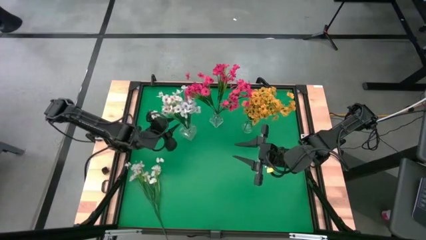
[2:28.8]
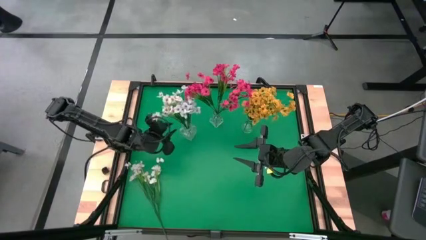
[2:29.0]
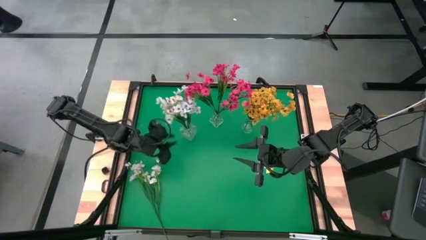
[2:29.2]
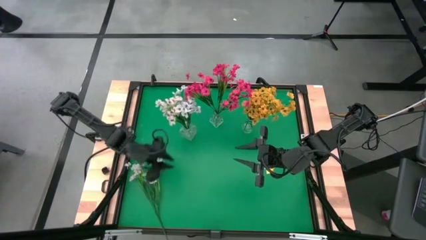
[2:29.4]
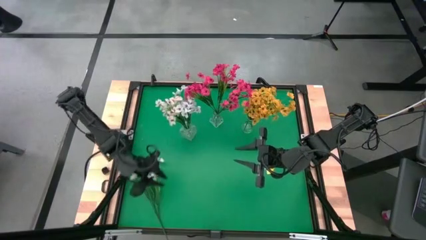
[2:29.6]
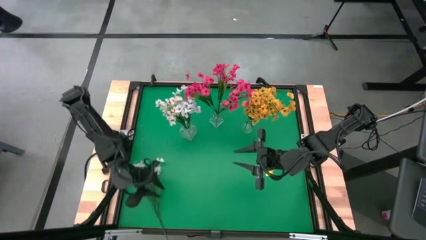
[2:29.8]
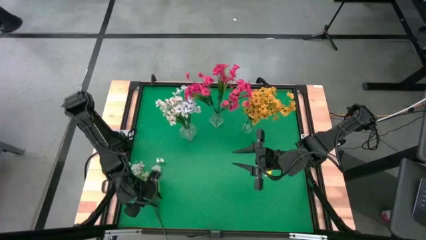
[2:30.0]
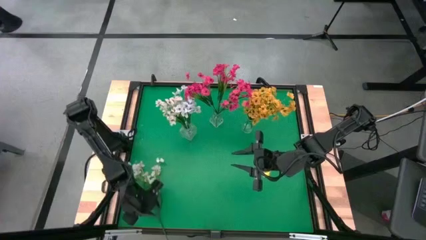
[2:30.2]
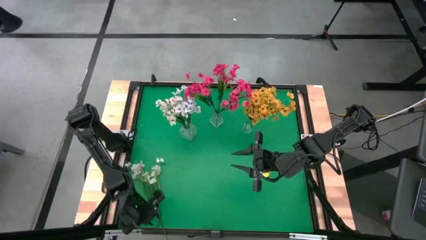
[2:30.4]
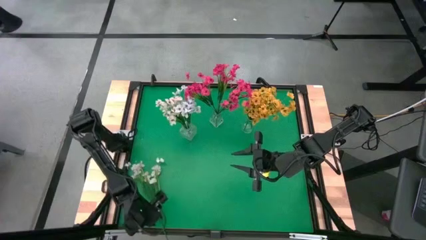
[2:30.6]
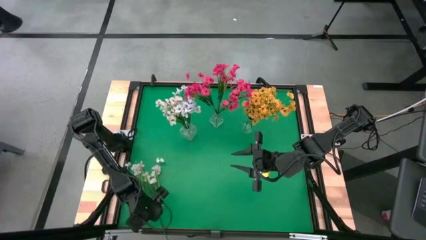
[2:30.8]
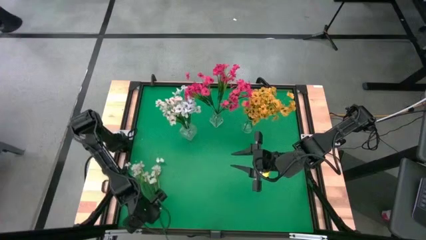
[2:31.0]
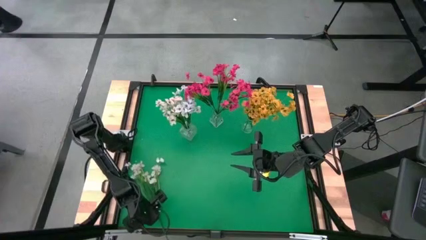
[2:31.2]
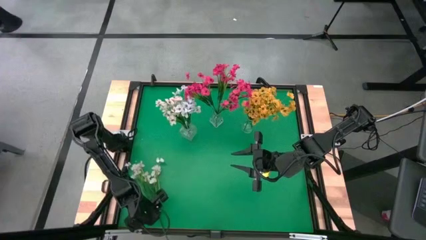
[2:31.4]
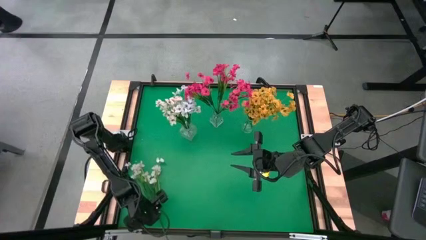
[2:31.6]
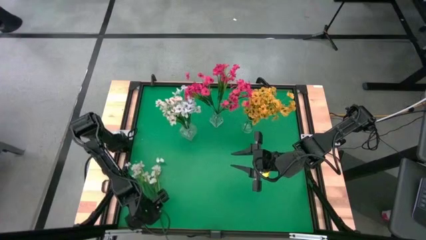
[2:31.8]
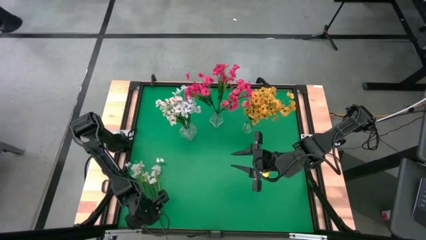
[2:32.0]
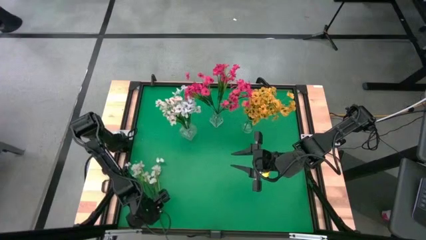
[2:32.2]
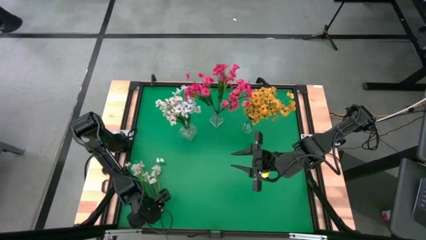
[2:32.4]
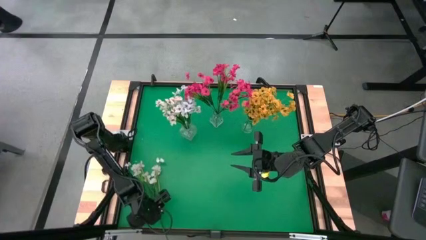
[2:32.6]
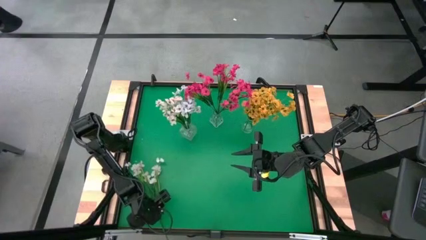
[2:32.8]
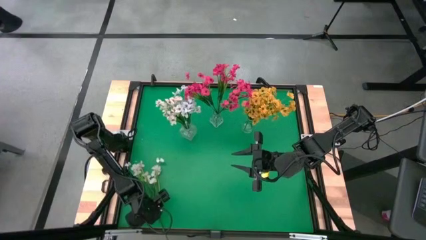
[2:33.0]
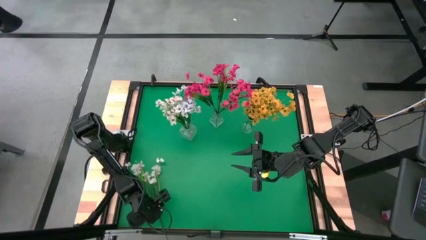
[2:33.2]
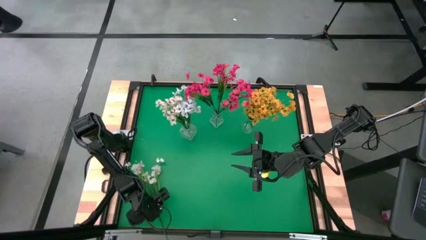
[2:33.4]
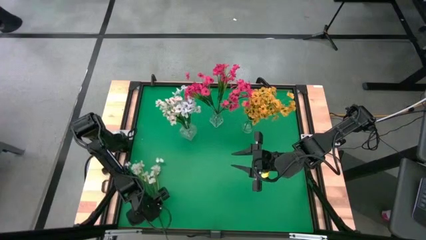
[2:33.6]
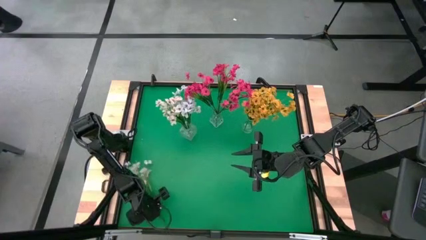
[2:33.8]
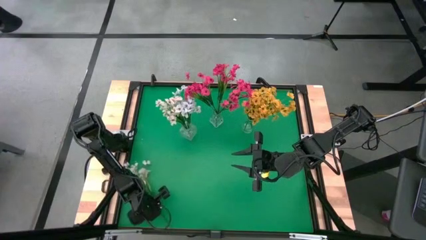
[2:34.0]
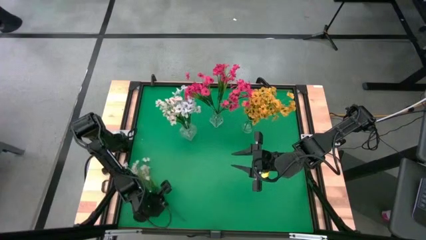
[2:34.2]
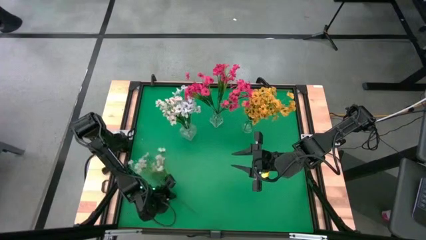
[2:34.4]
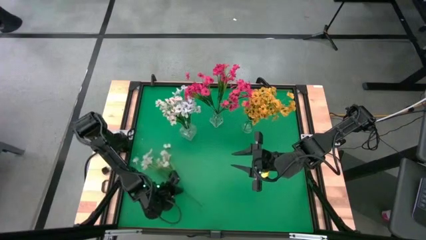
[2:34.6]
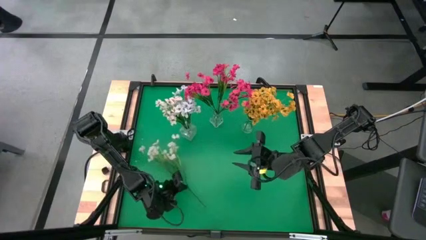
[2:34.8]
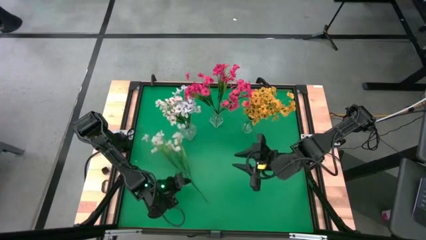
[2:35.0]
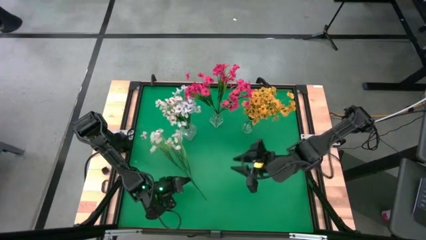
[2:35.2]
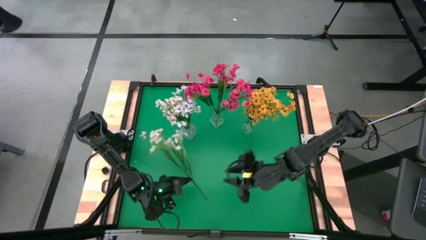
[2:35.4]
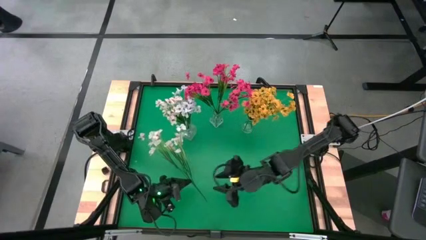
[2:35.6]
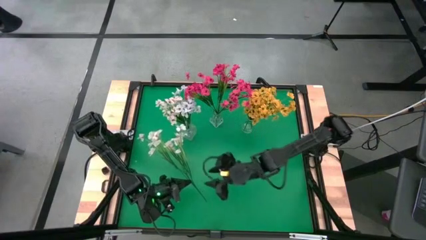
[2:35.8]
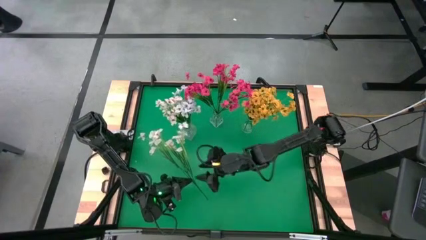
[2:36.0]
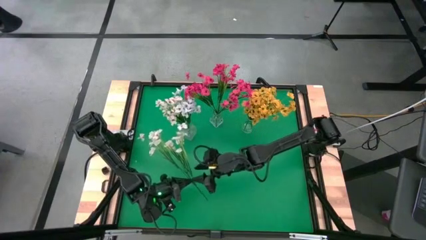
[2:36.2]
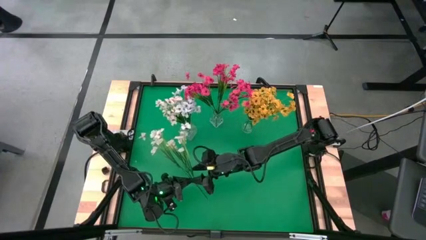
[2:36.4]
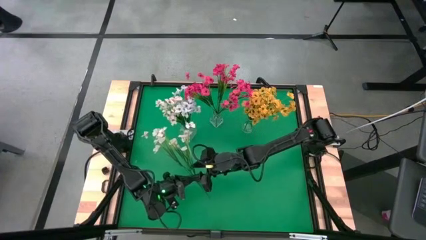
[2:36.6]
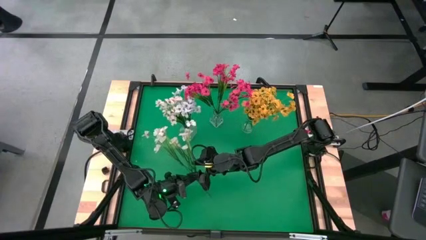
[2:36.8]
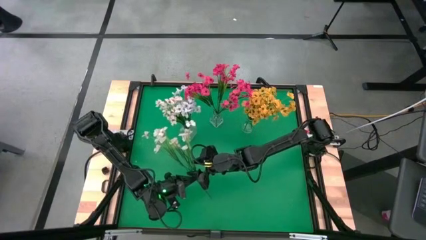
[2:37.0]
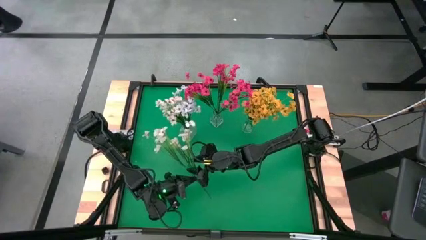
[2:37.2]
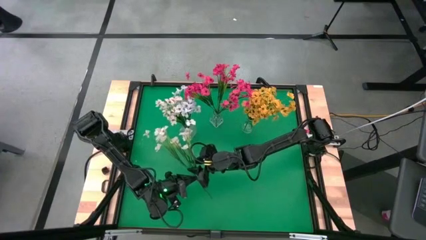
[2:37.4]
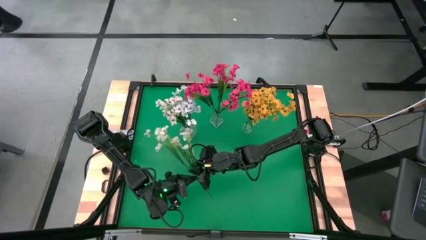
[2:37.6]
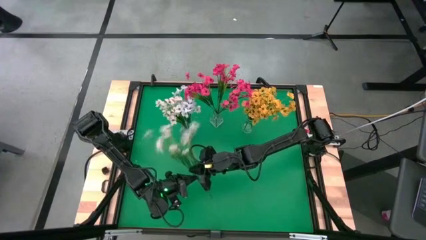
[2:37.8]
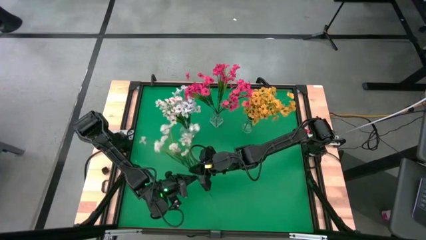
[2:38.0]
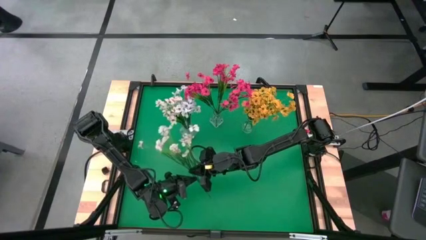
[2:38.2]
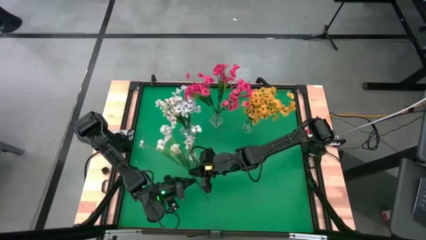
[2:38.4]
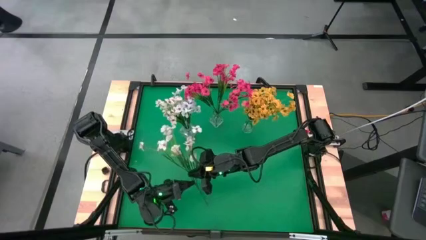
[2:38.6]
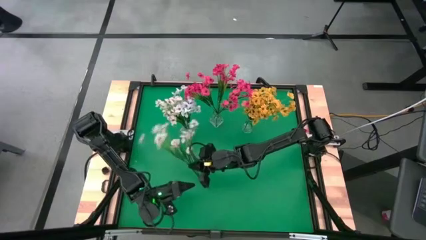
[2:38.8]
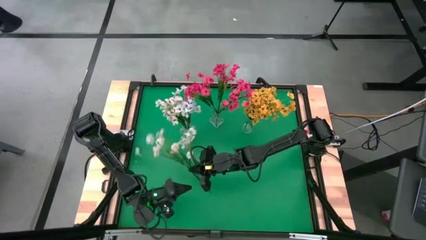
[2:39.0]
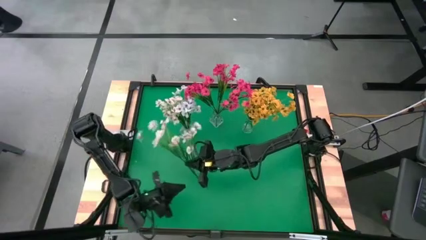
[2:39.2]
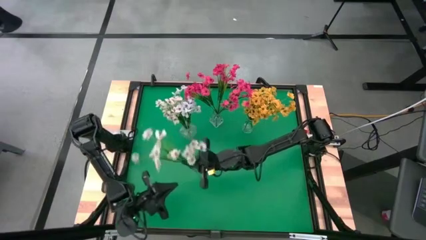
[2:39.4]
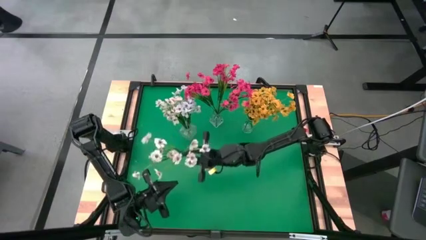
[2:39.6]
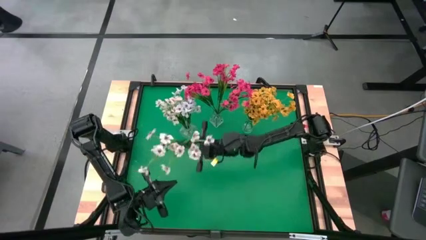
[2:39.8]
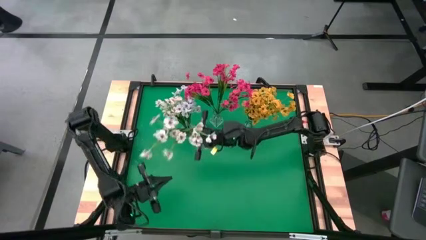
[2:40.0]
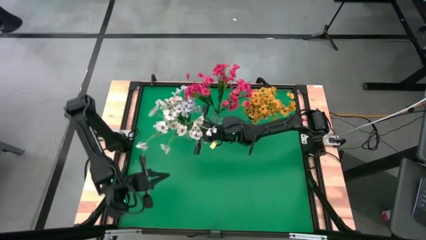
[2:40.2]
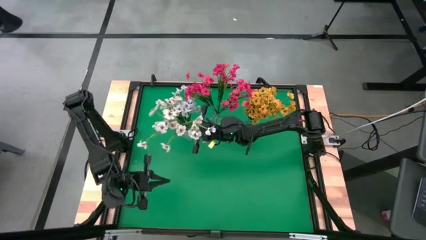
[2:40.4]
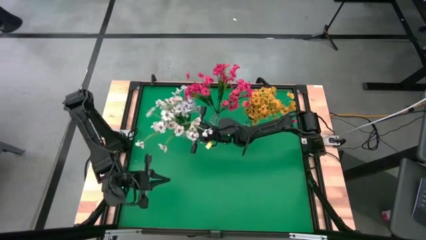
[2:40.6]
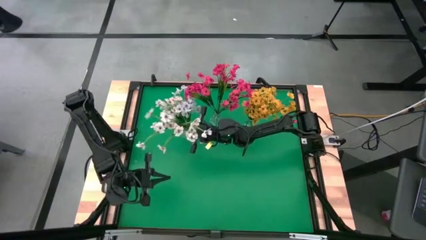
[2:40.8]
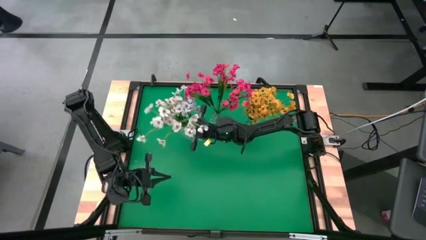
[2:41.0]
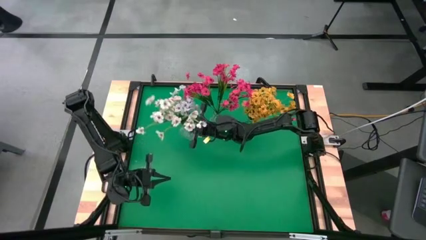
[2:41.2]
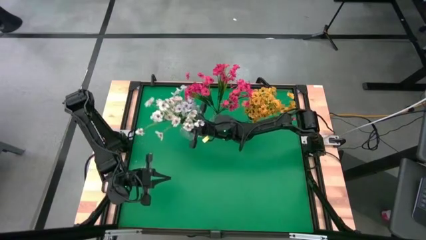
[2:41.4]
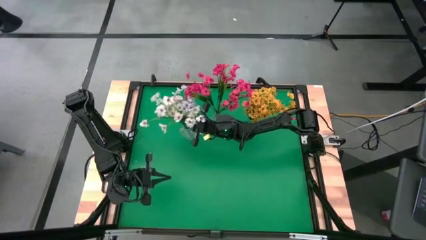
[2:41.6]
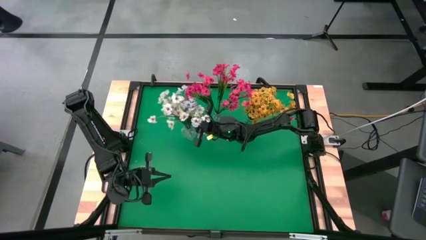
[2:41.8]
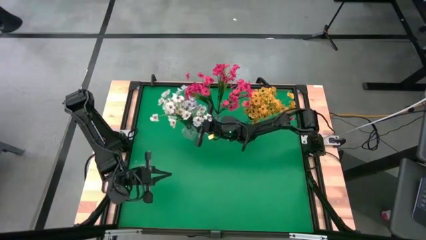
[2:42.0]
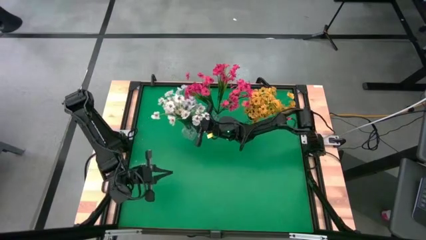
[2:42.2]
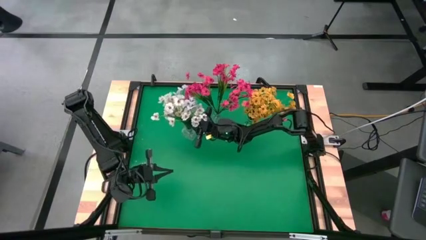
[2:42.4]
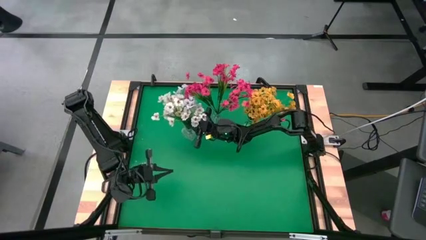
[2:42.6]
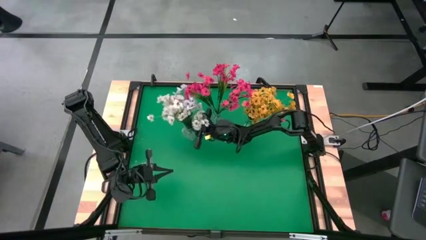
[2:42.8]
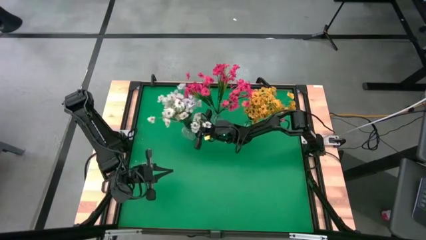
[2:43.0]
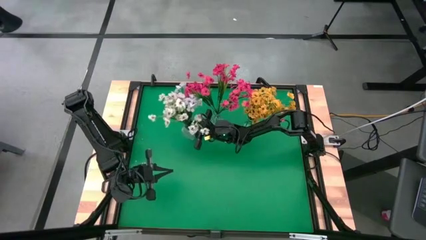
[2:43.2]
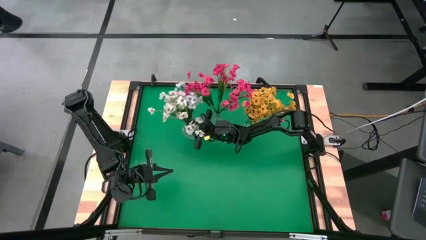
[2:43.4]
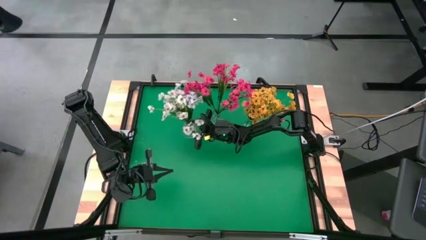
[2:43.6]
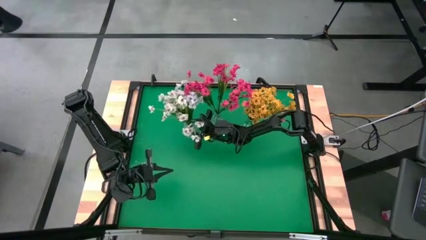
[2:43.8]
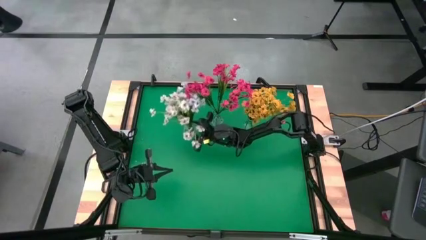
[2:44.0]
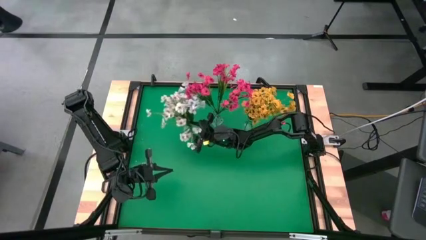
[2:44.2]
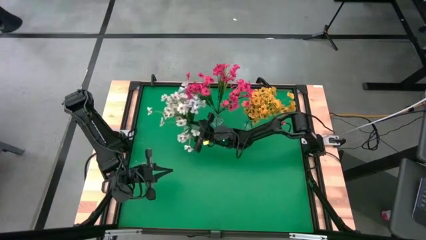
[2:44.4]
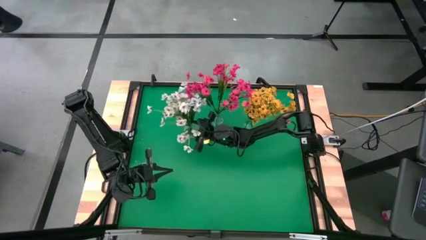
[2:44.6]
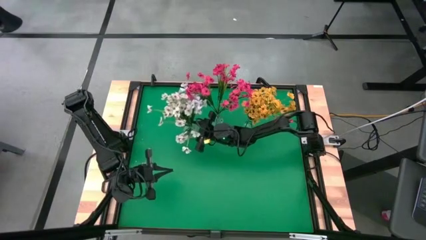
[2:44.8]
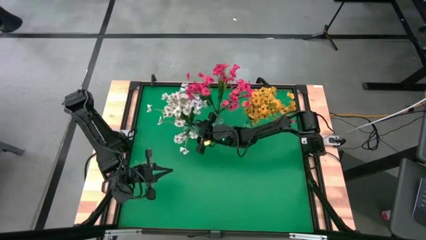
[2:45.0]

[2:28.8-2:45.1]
Task: Sort flowers into vase by color
Put the white flower into the left transparent vase
